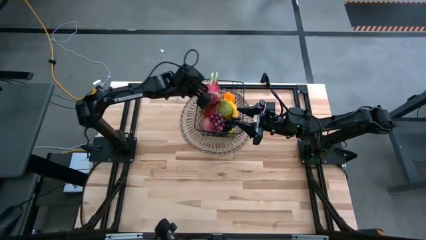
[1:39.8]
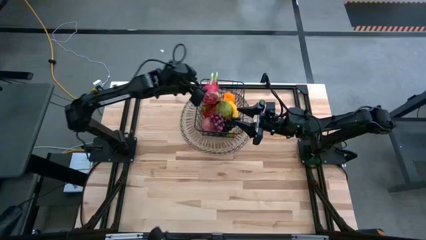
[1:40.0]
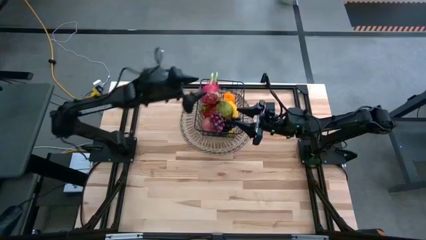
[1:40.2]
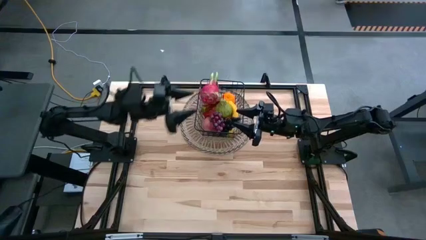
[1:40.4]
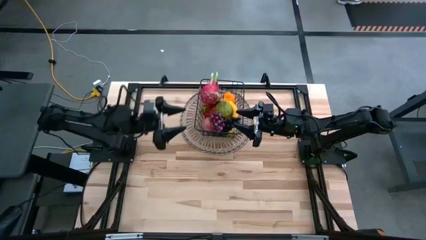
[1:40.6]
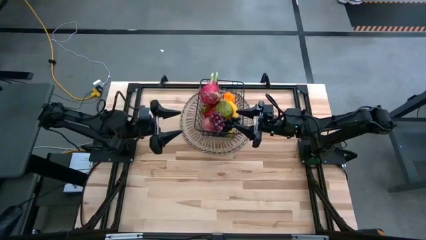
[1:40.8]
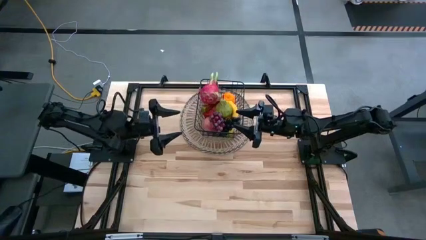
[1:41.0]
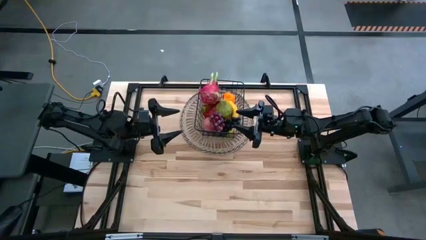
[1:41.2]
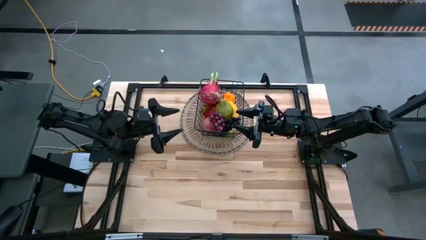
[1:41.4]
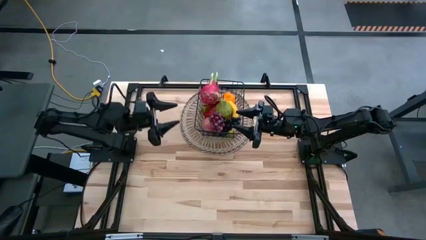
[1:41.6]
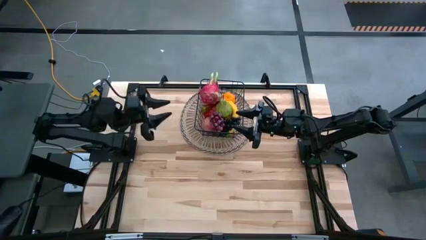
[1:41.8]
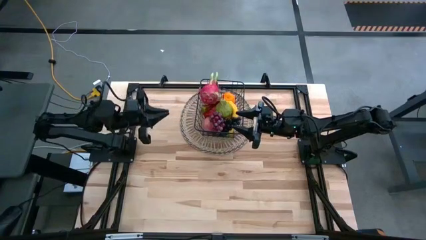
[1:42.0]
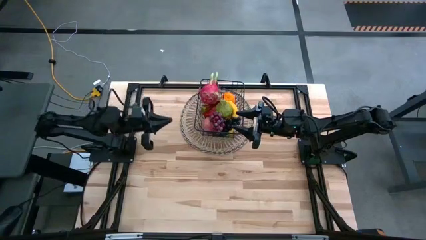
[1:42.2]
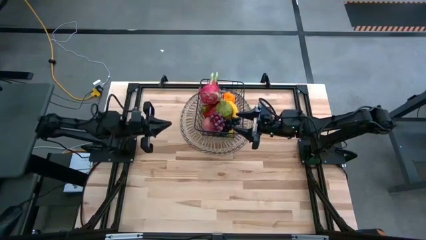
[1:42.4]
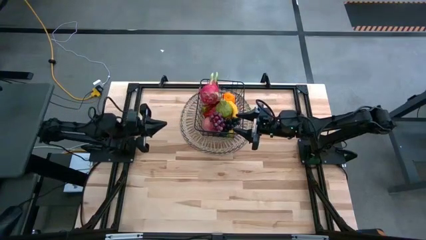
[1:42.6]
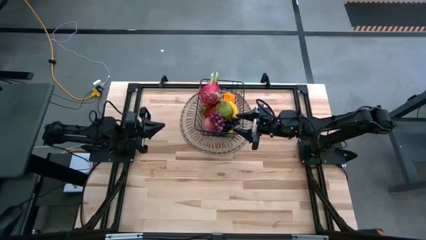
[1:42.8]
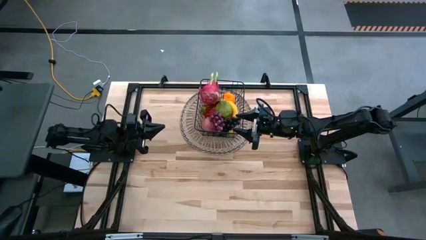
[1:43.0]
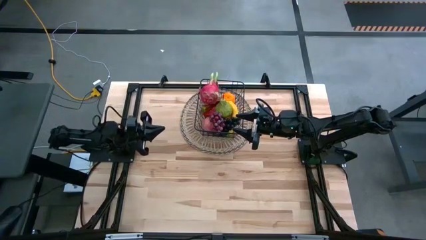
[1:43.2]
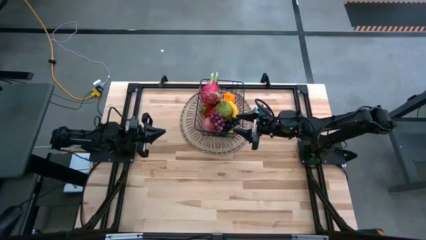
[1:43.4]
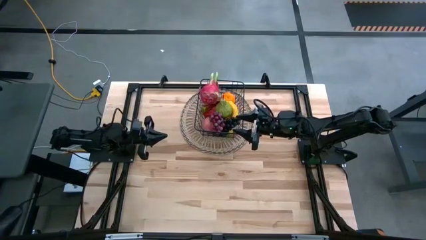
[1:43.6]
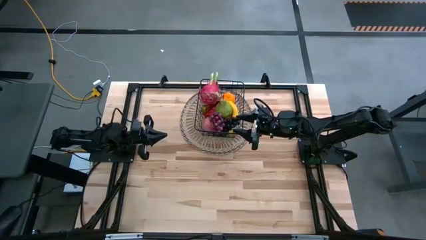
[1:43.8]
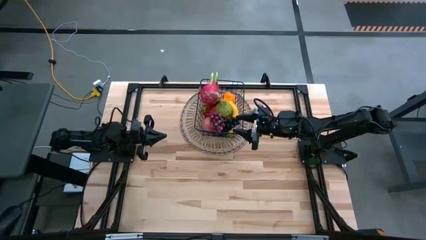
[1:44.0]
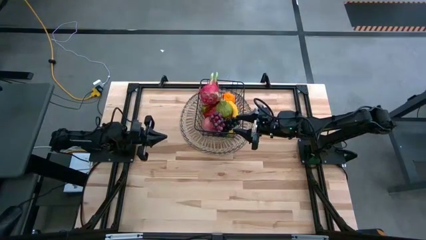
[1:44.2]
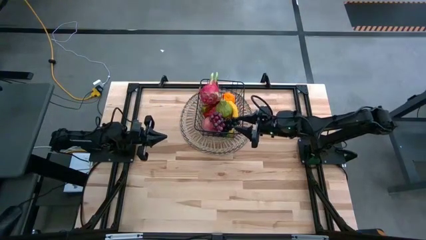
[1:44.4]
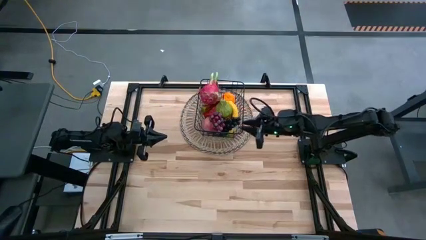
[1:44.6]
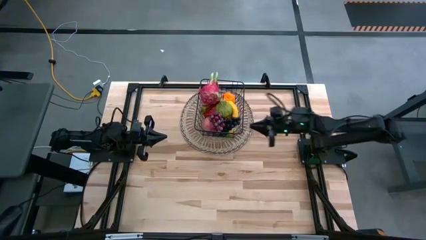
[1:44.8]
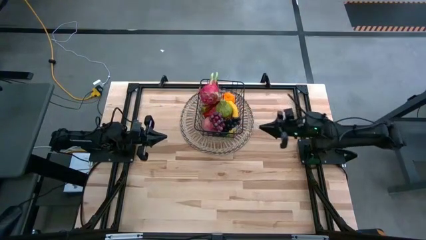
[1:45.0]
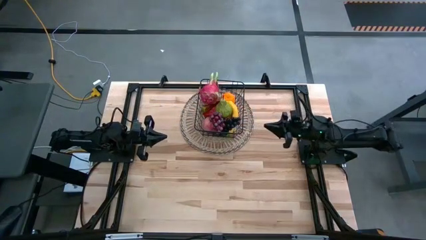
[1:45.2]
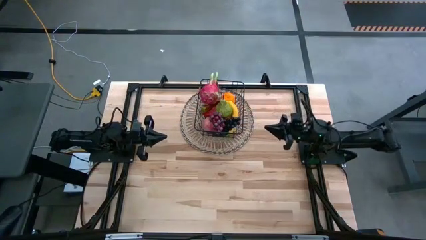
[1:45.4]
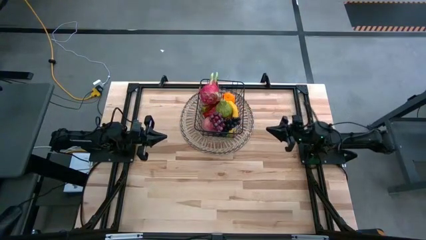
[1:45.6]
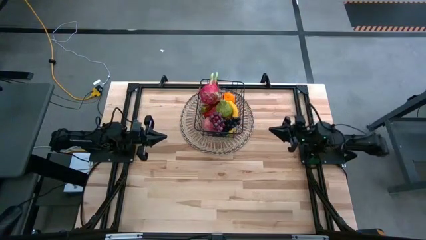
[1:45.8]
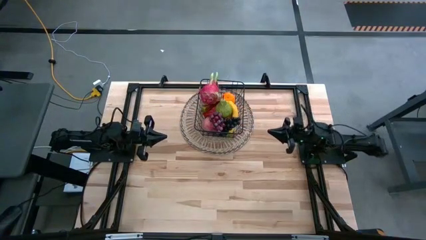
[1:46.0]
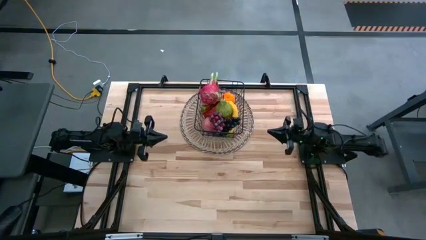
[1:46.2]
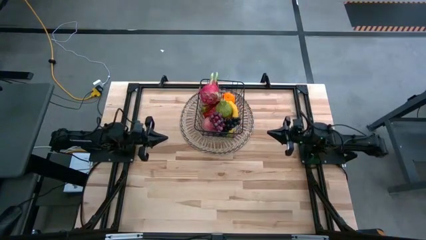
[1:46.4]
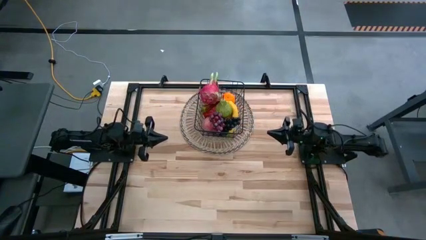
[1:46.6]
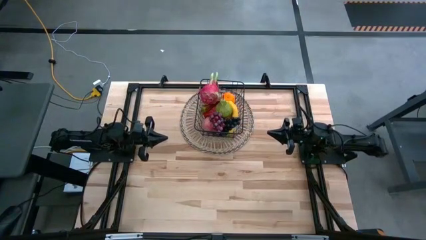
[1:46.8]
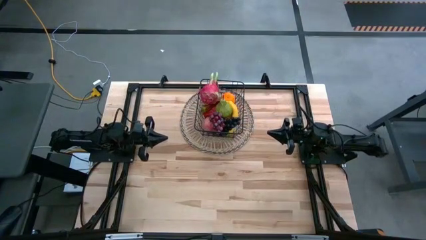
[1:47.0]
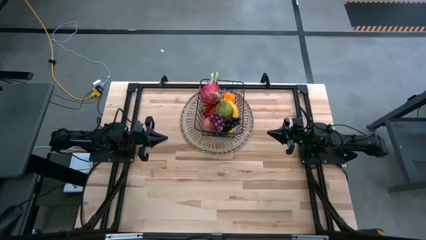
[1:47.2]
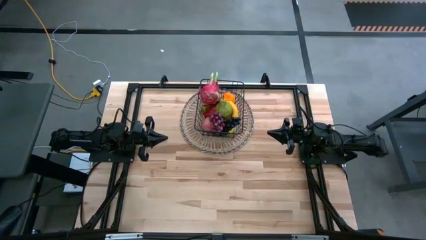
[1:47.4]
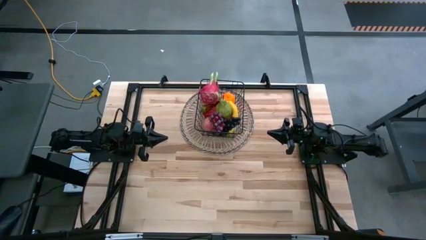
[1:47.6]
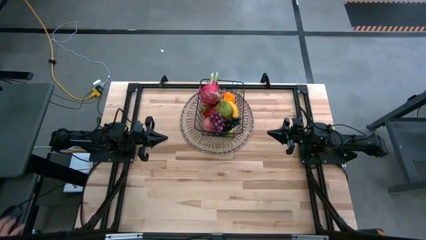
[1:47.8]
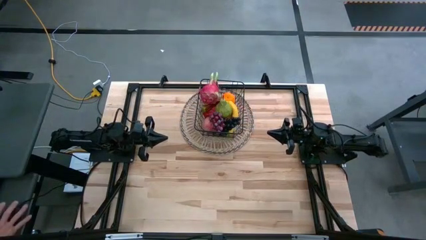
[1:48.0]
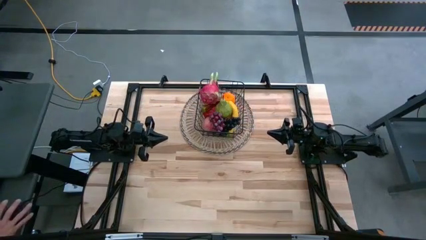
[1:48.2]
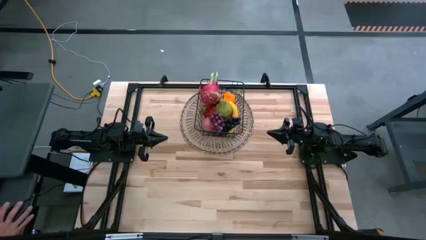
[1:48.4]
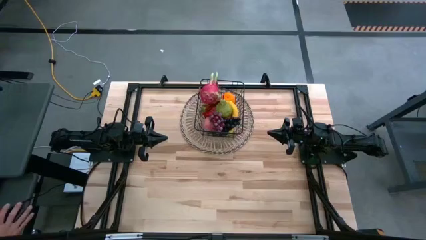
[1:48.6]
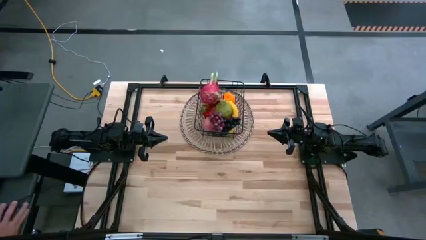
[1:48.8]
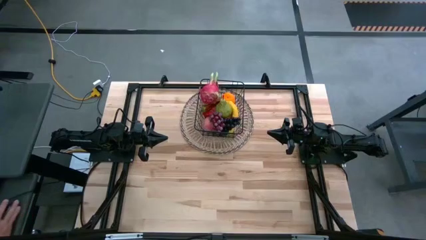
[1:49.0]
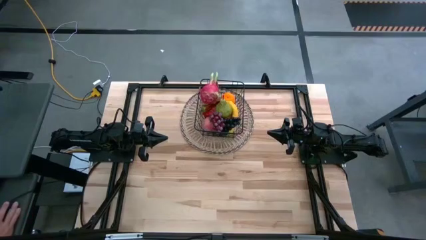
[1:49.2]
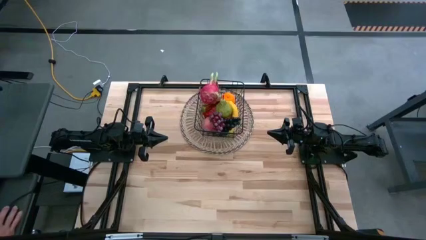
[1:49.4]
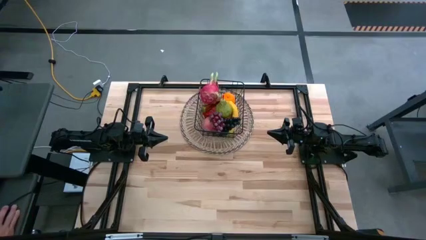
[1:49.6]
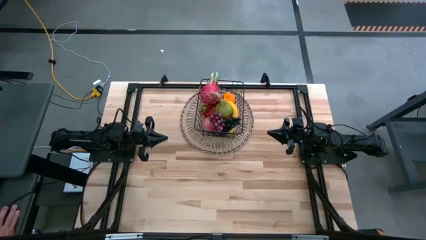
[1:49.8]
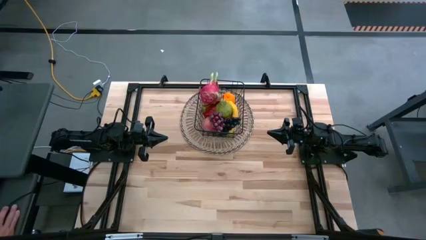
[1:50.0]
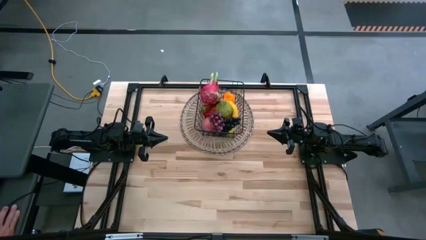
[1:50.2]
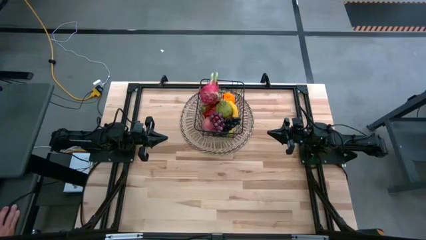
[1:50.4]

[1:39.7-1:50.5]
Task: Build produce basket
Return to Home Position

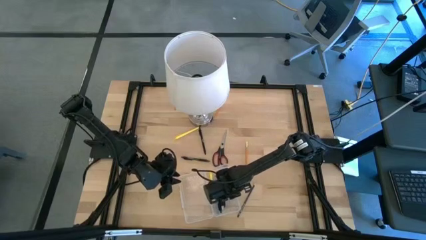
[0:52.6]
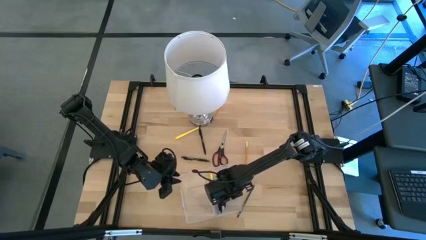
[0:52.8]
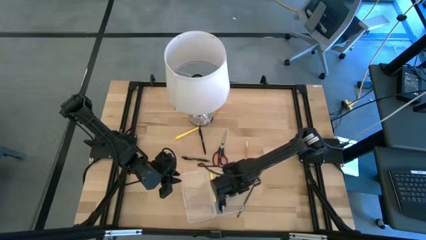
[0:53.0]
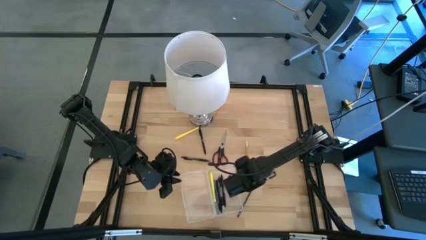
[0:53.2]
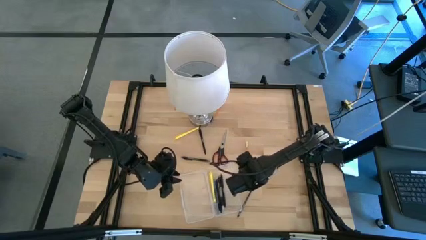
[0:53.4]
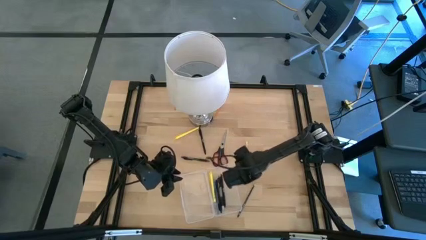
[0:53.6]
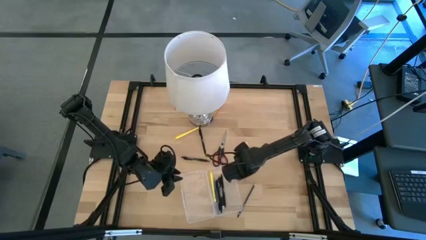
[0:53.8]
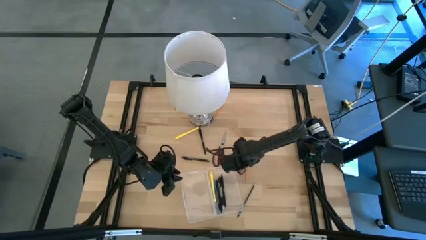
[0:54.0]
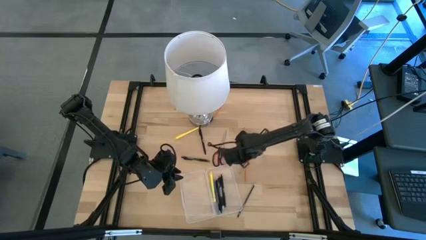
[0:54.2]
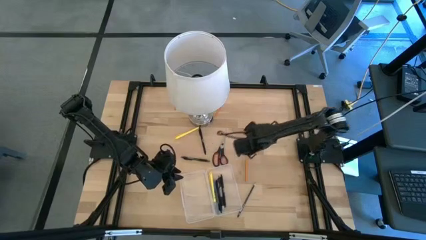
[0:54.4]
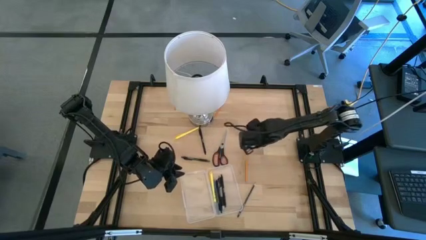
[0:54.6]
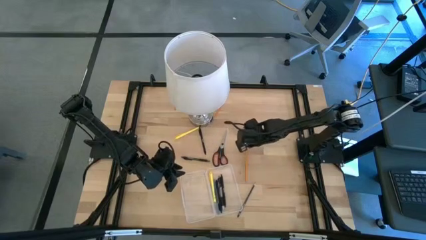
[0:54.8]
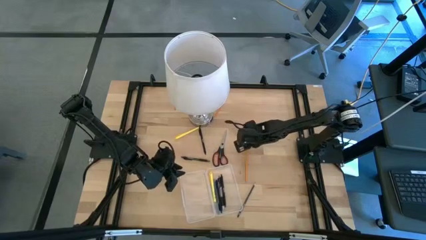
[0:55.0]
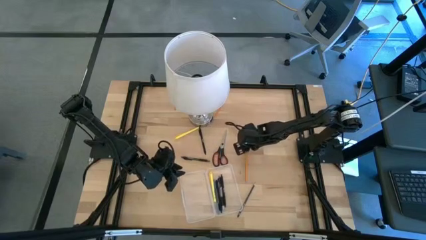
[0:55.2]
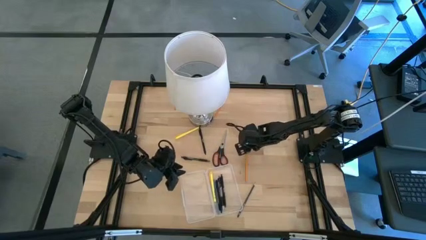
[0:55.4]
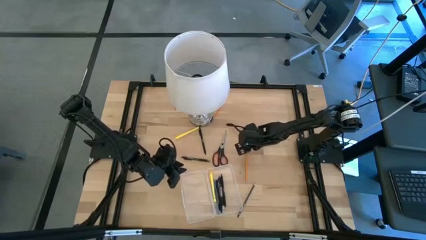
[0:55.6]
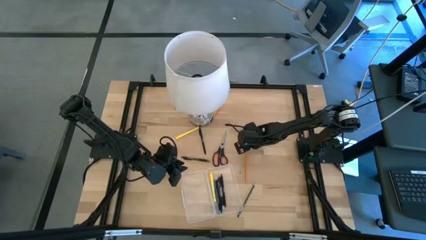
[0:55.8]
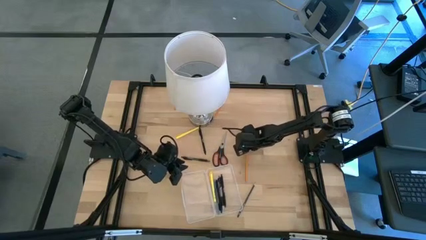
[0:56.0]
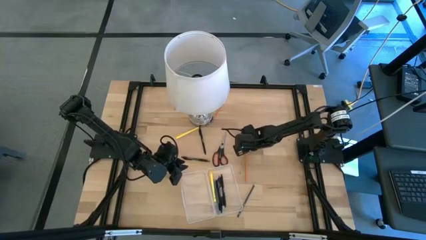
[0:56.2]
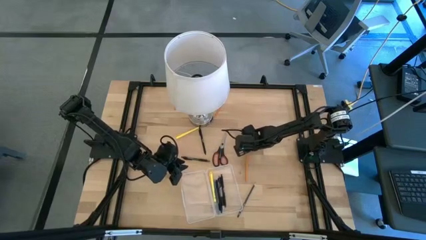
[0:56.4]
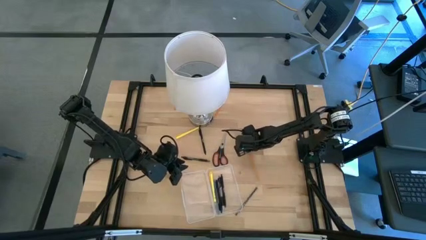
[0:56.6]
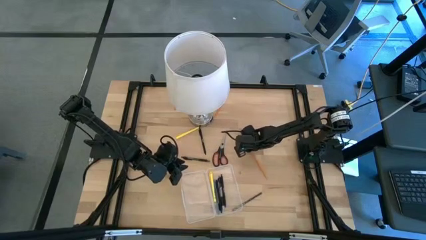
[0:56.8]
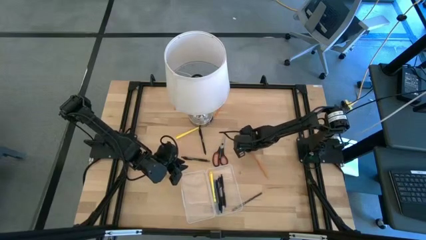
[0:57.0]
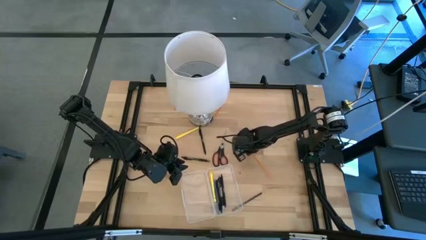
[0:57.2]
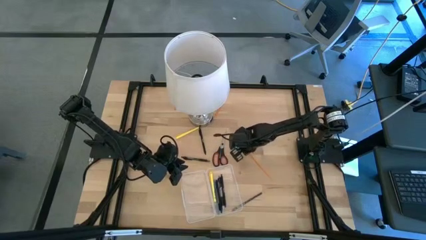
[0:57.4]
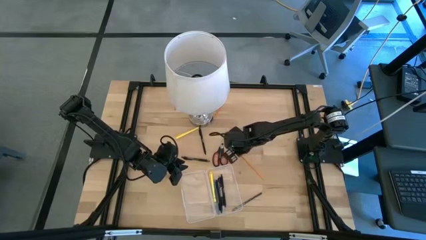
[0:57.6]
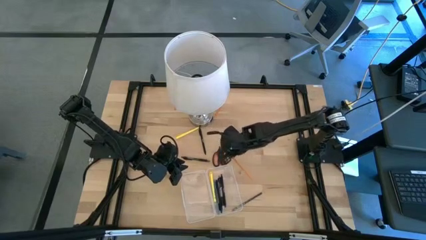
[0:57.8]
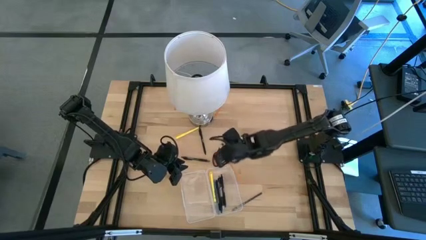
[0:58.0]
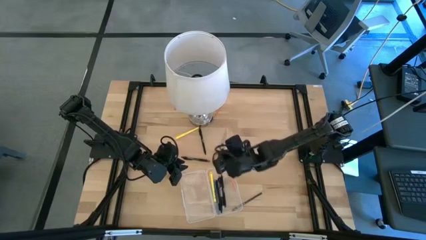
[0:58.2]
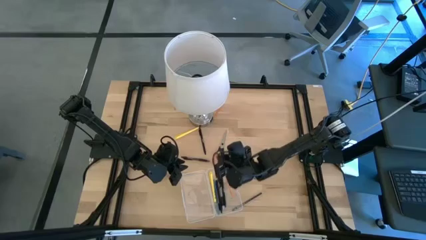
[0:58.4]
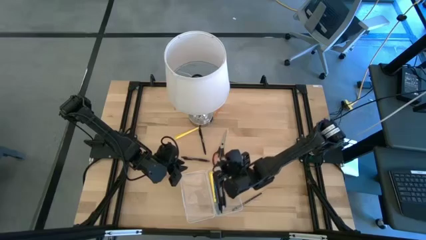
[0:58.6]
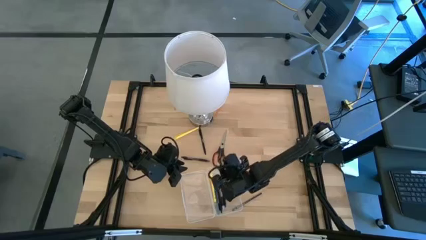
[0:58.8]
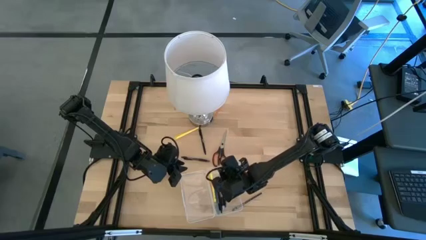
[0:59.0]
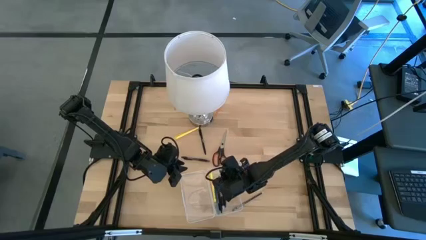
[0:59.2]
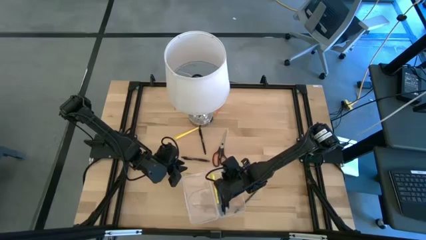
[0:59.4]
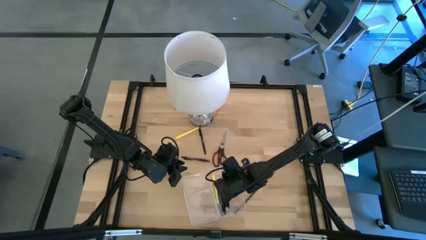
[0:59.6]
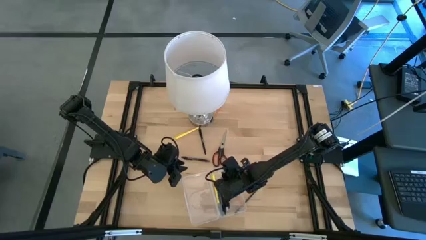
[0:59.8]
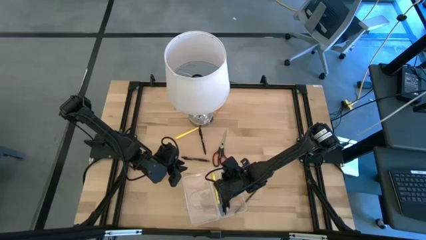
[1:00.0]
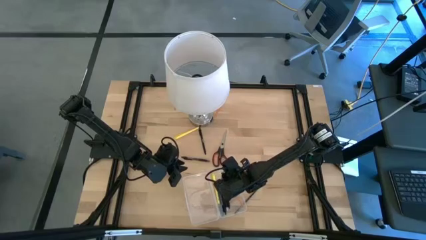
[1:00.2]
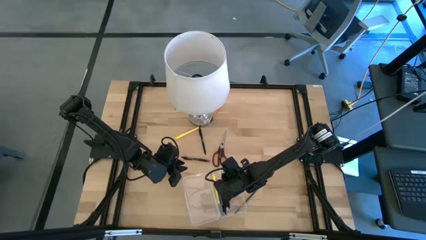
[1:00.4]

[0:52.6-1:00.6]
Task: Pick & place school supplies into a supply box
Put the orange pencil into the transparent supply box
